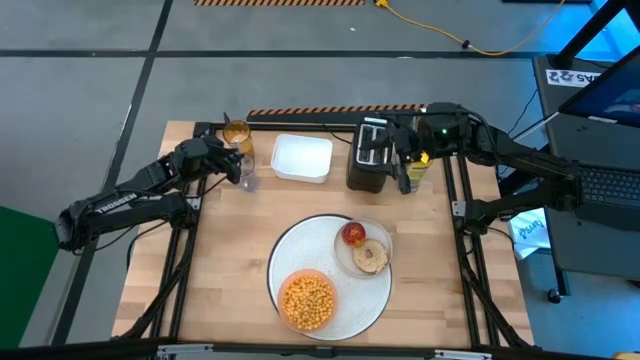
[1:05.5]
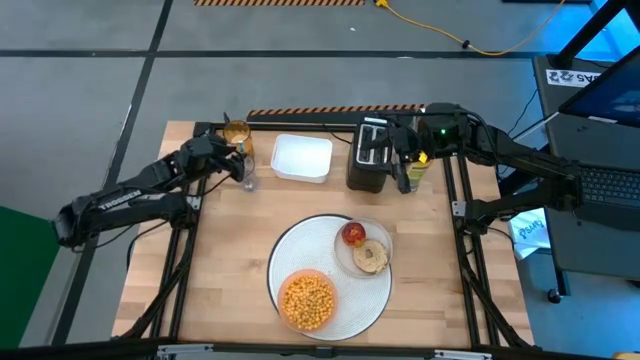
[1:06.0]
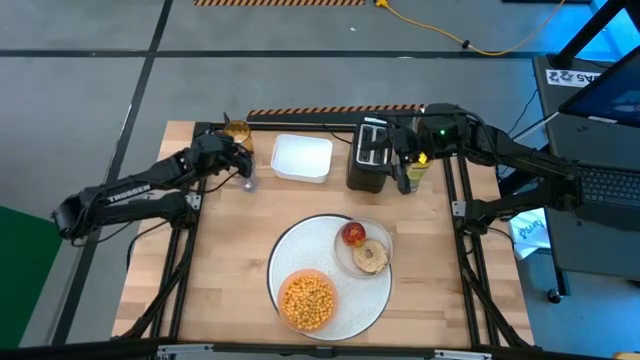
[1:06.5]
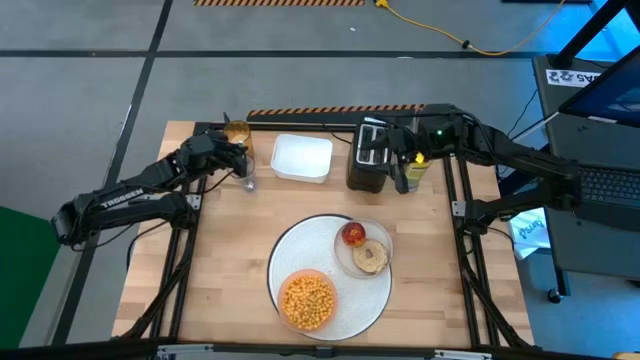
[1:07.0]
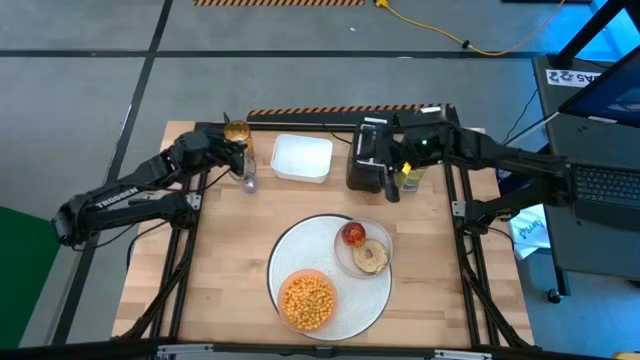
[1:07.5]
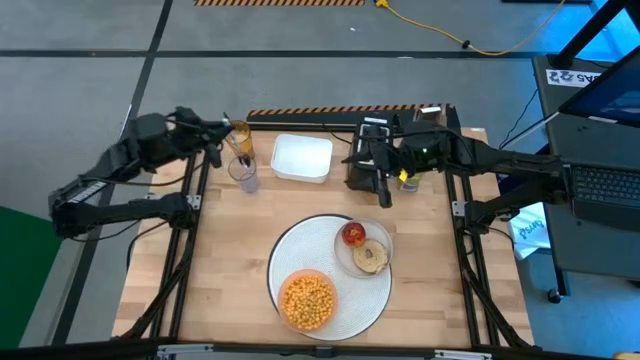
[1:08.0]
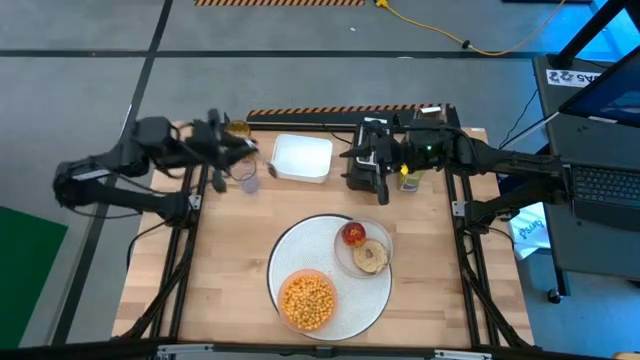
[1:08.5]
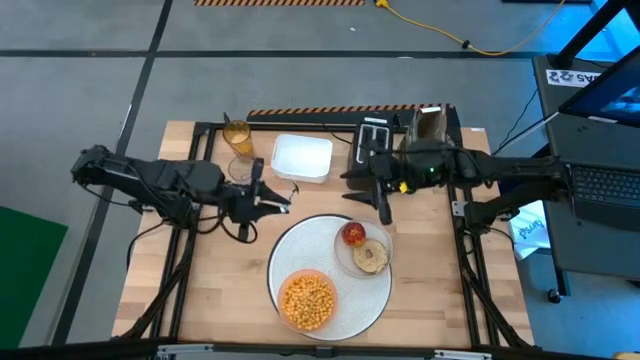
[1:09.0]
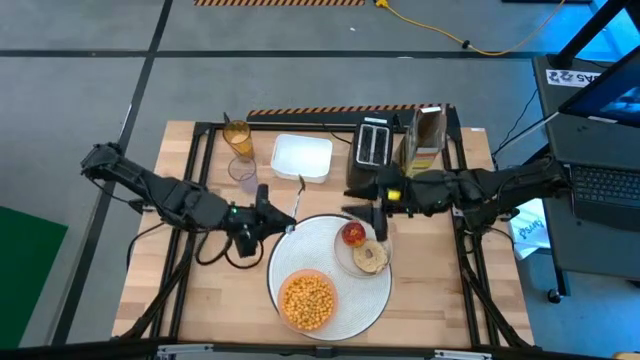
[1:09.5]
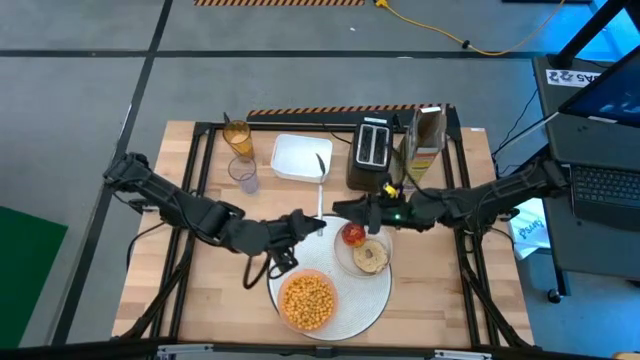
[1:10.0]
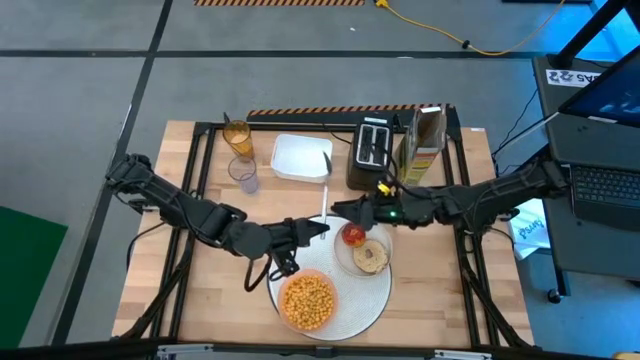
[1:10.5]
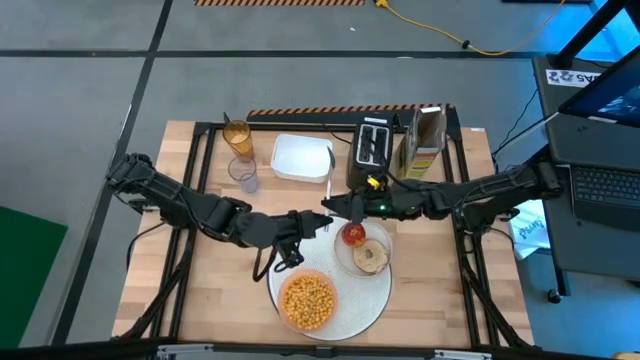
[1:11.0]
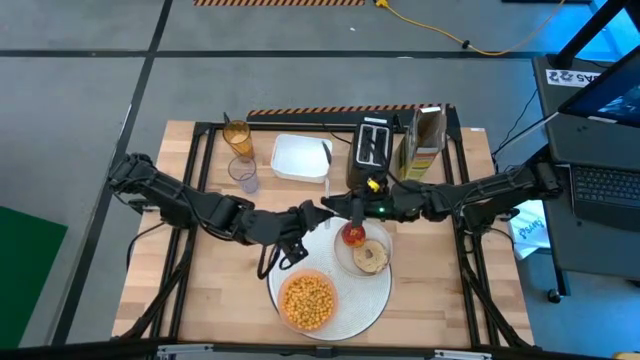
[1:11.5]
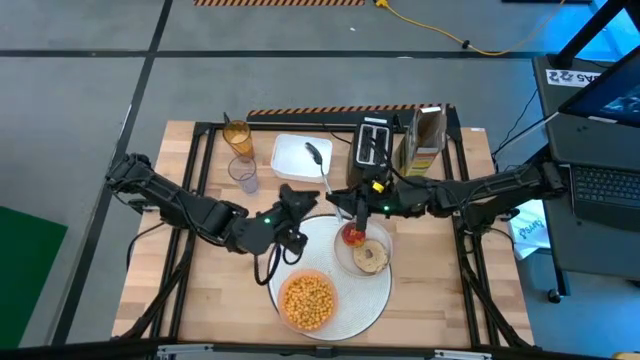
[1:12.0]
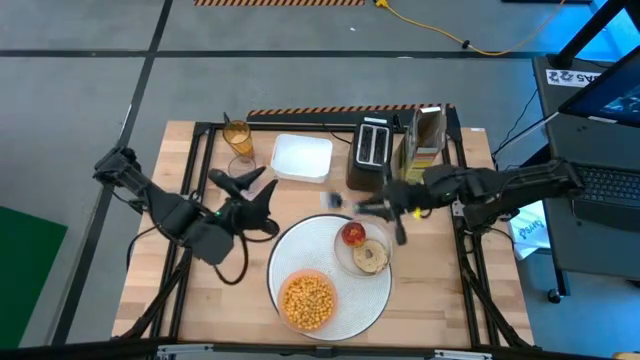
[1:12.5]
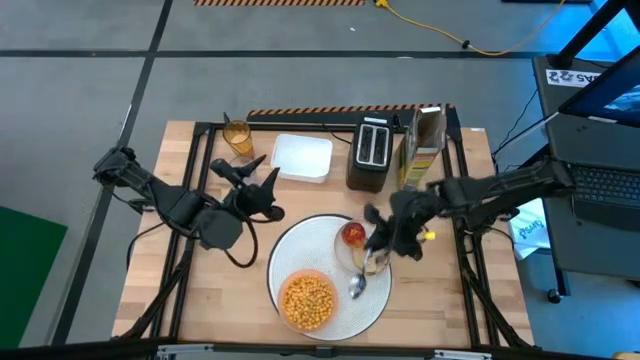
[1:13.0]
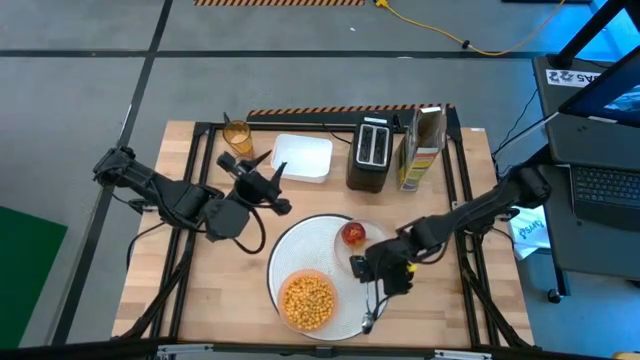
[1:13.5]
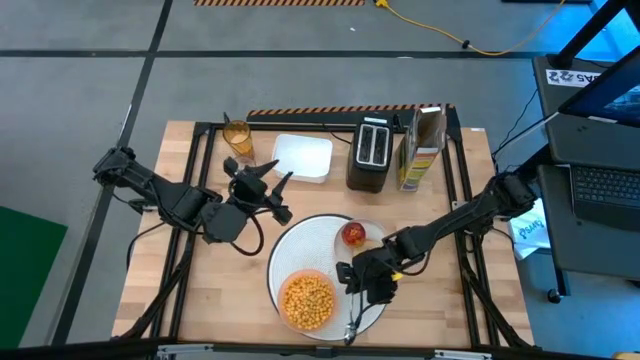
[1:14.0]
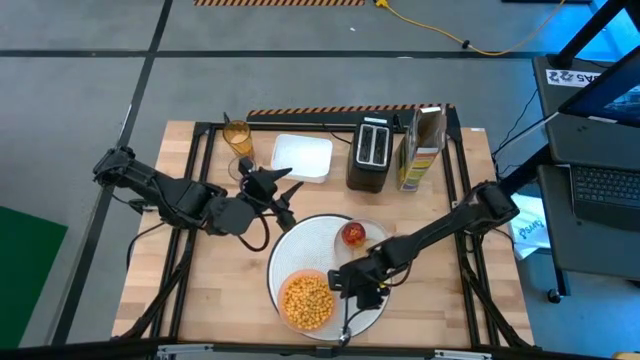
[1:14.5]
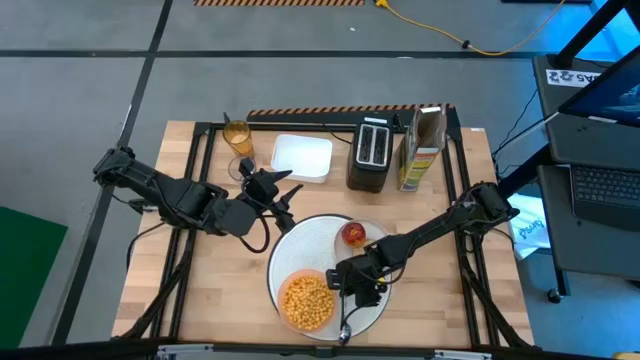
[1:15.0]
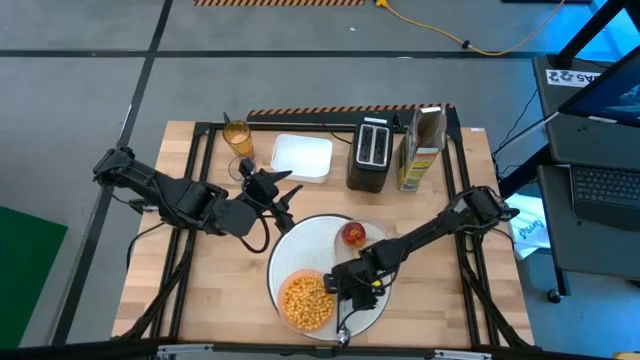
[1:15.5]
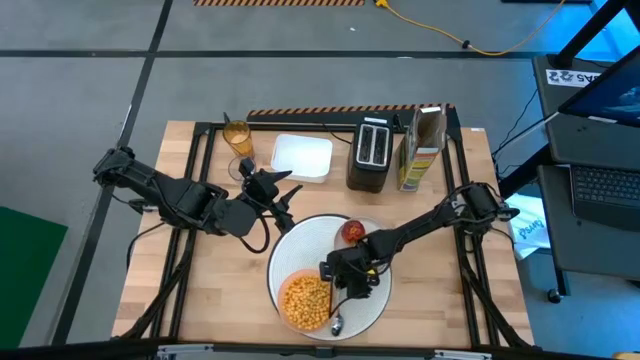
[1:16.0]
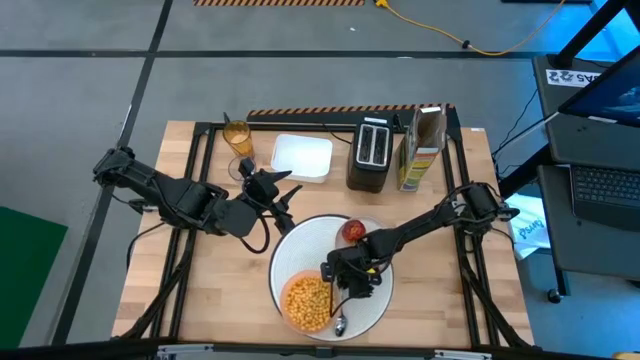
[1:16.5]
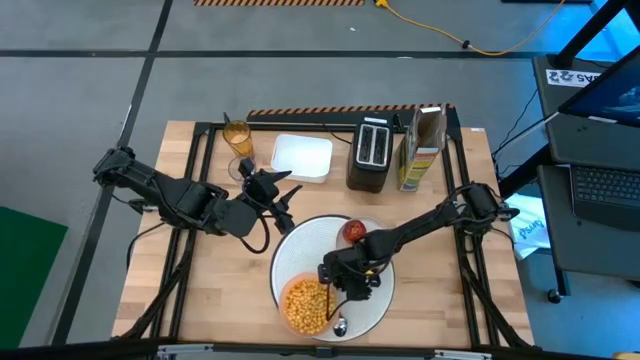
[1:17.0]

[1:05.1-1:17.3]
Task: Arrange a breakfast setting
Put the spoon on the mat to the right of the pink bowl

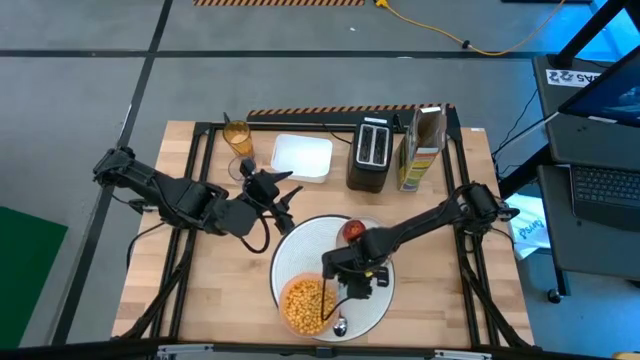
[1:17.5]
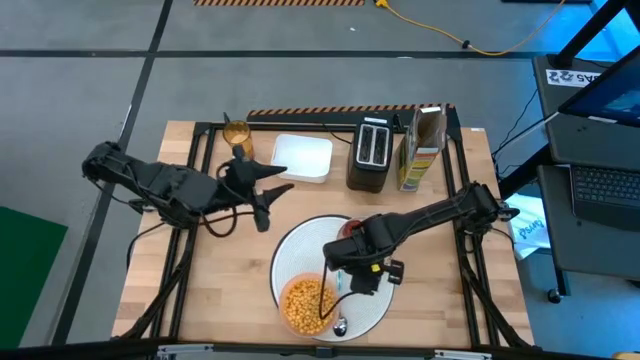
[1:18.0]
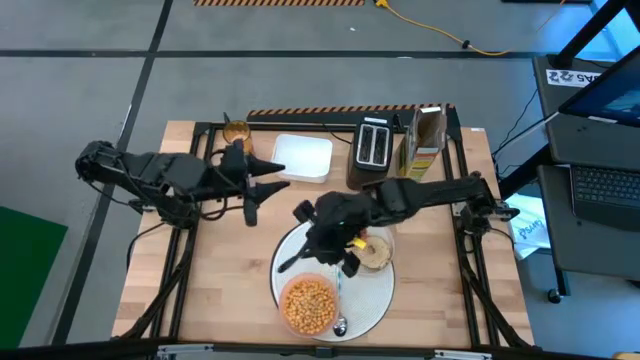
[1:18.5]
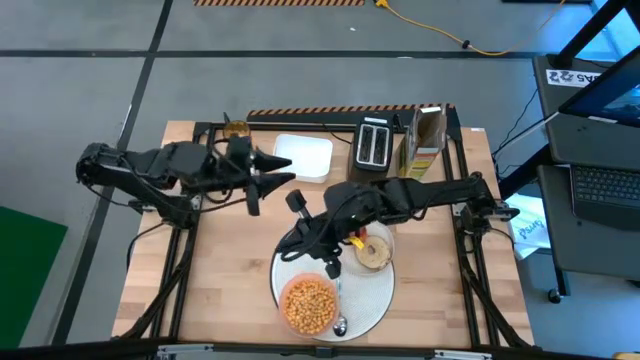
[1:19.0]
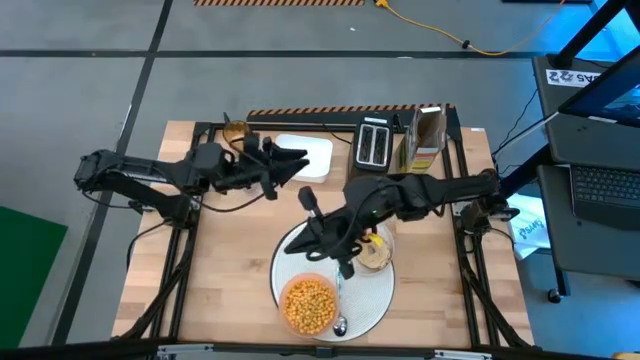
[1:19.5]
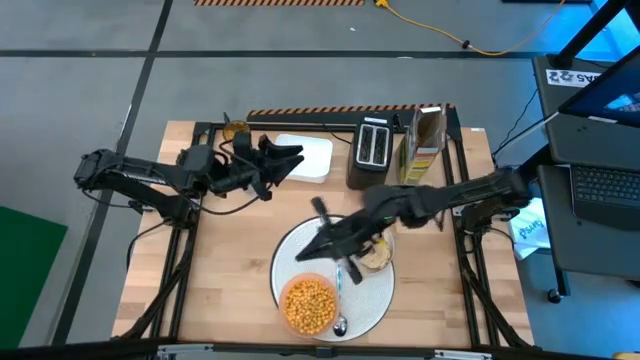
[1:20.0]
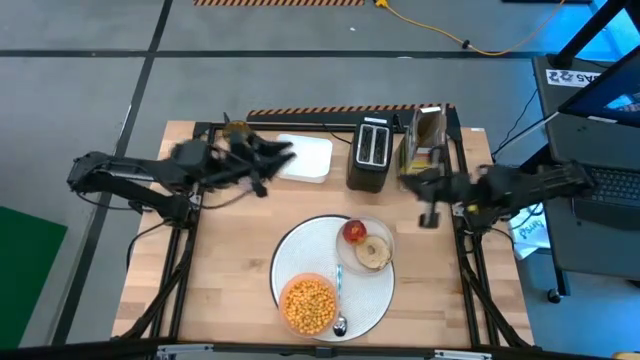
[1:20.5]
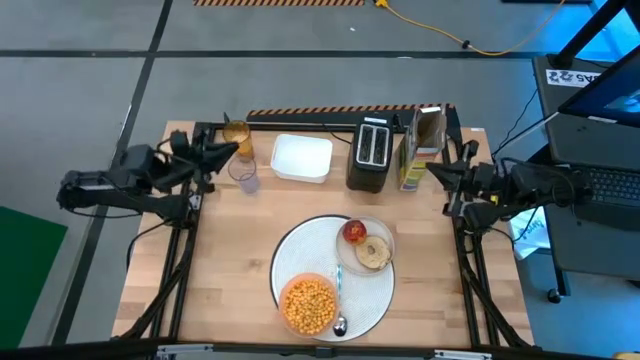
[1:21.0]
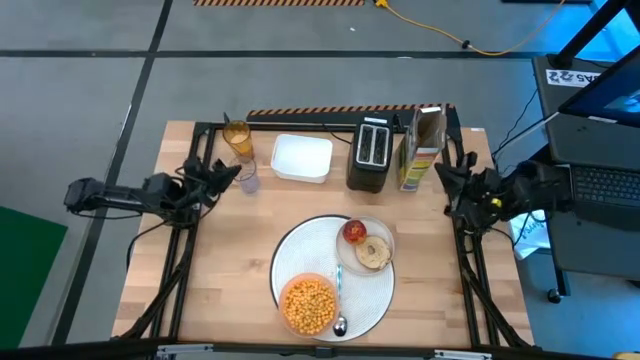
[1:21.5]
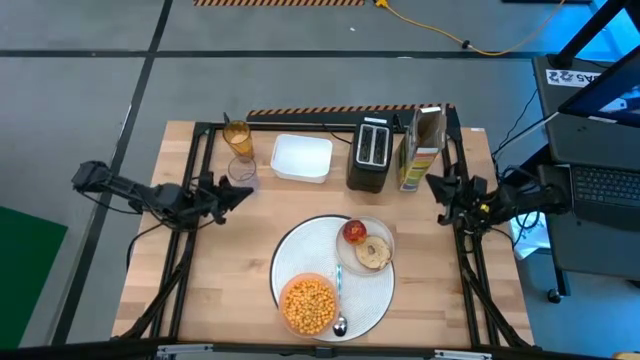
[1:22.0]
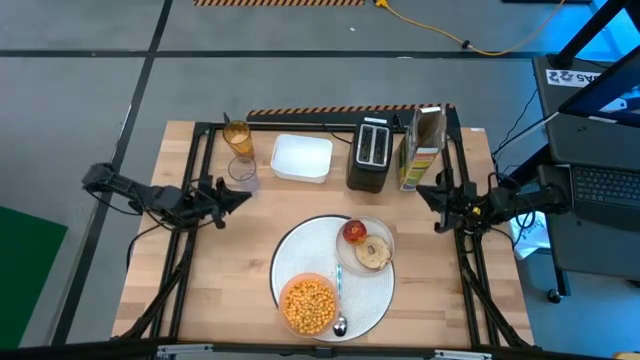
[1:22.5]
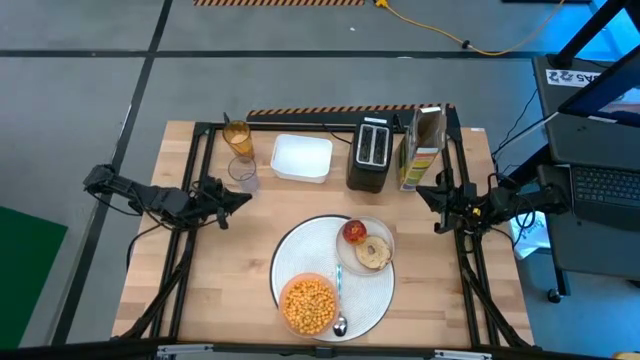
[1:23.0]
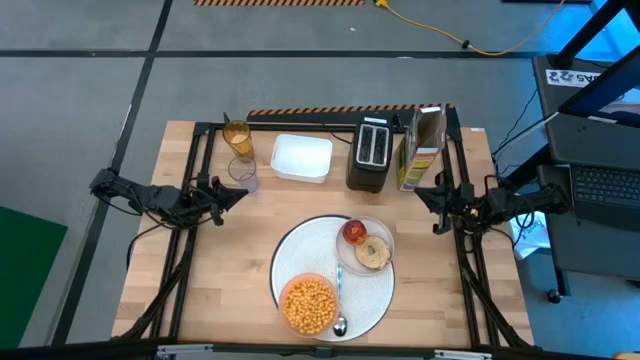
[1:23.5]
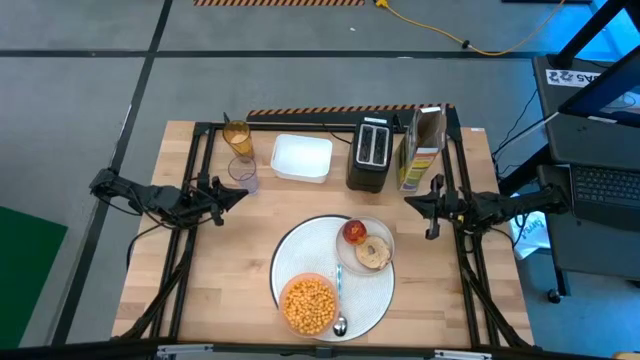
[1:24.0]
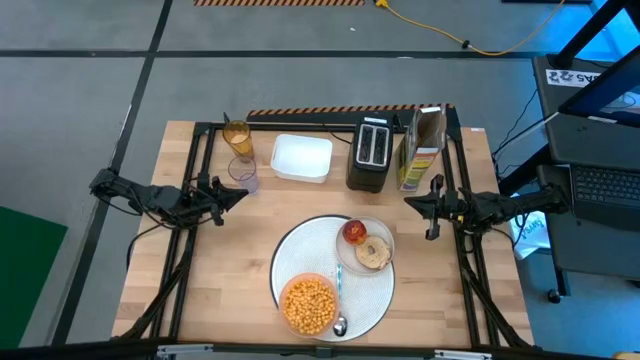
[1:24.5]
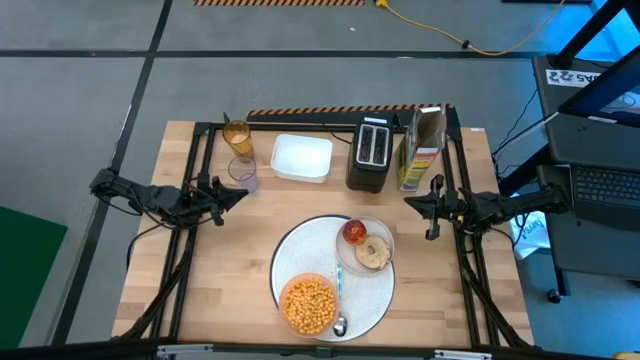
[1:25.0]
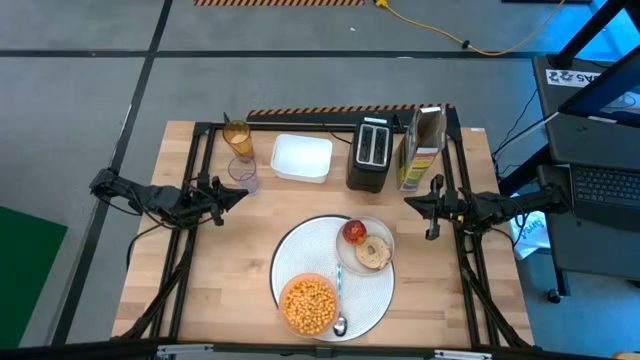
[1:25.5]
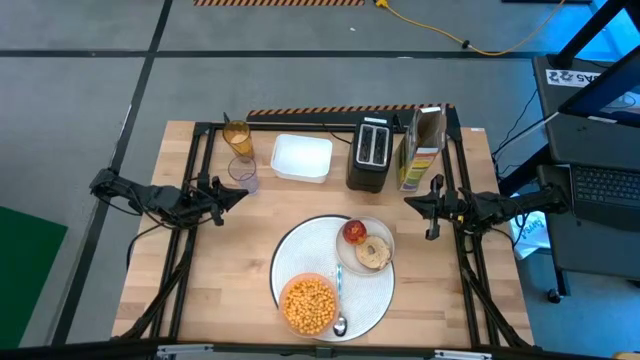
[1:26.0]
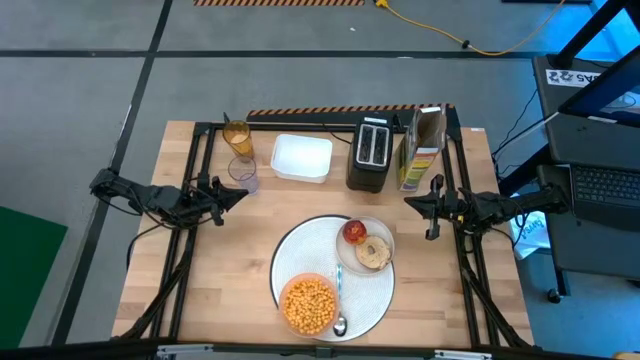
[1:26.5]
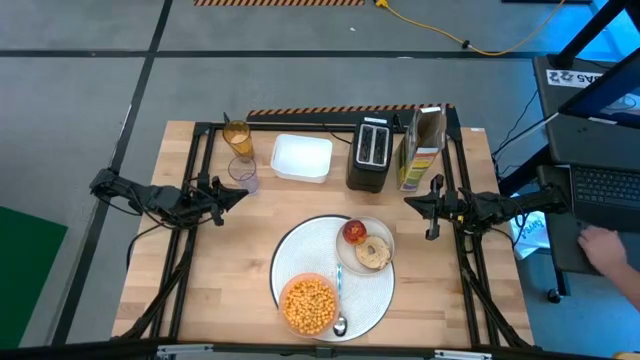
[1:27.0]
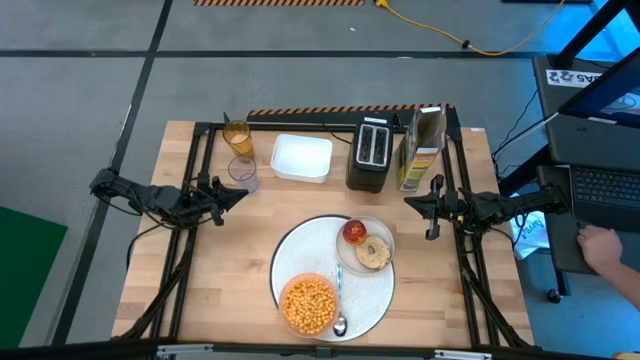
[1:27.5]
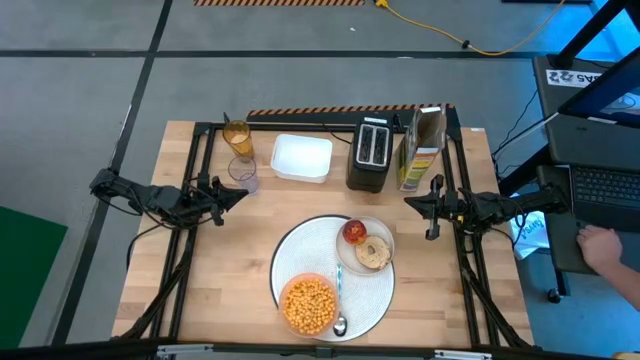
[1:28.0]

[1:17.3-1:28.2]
Return to Home Position
